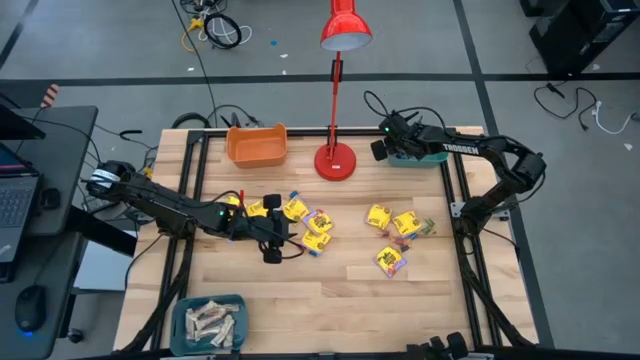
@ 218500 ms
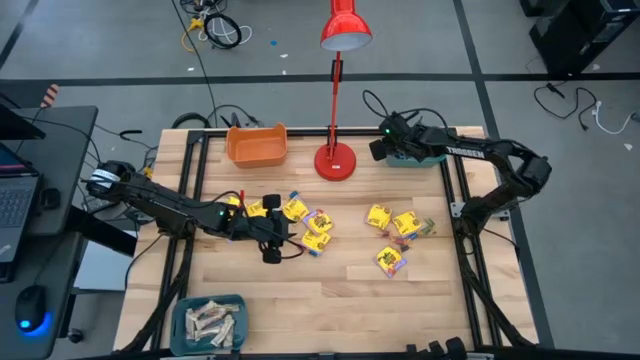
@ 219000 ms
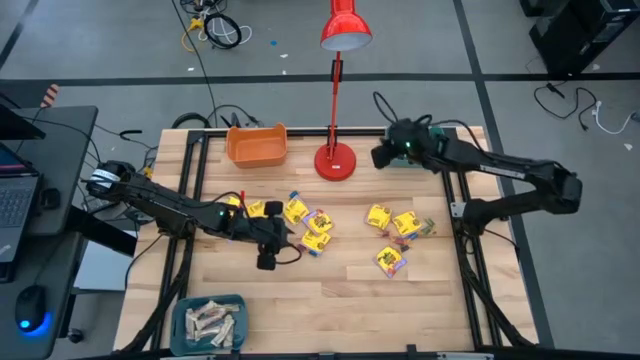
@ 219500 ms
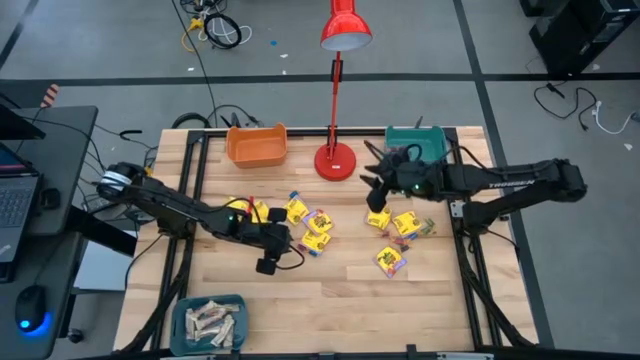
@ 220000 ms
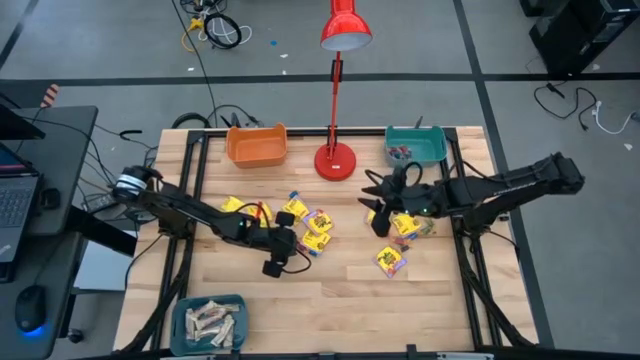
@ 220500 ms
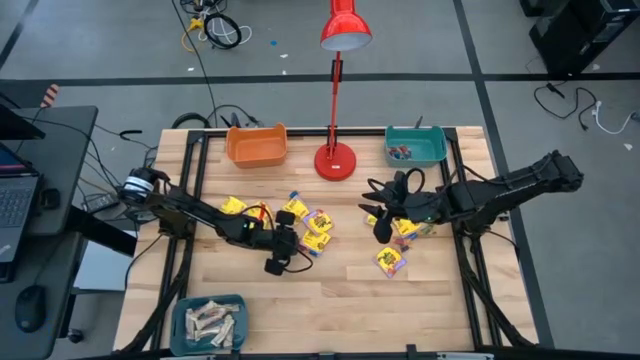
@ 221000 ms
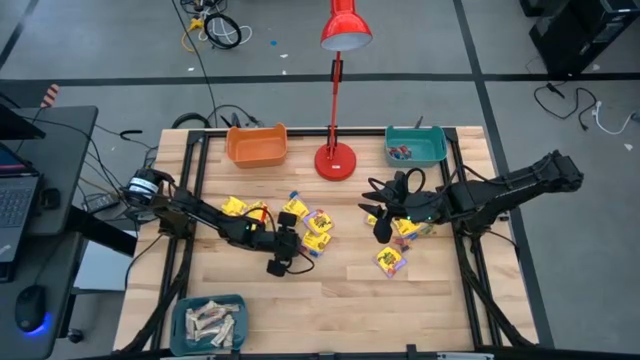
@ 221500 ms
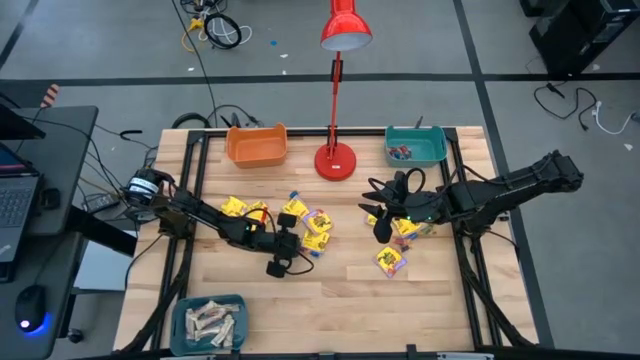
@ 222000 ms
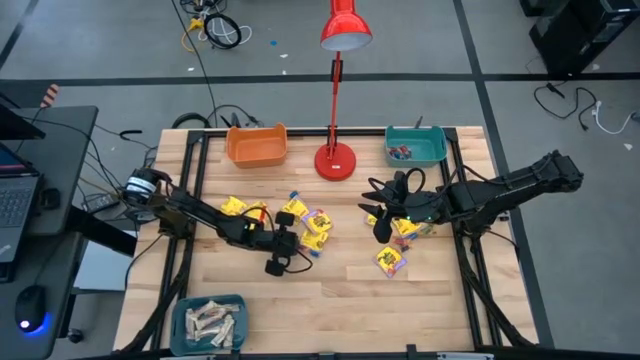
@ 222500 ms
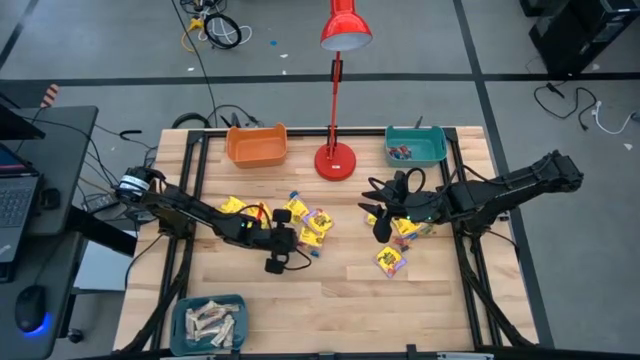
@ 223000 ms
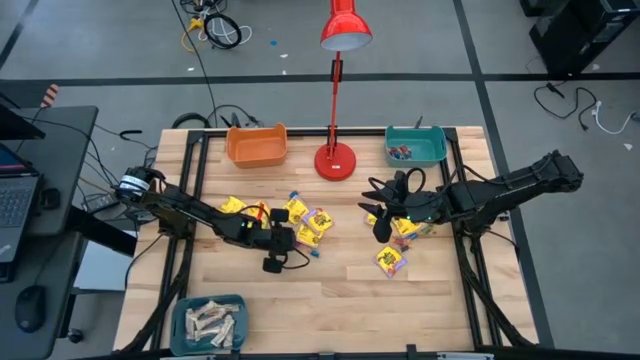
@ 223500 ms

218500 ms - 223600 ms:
Task: Sort candy
Put the small red candy into the green bin

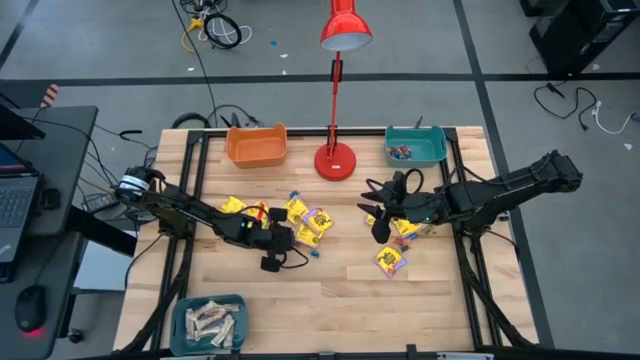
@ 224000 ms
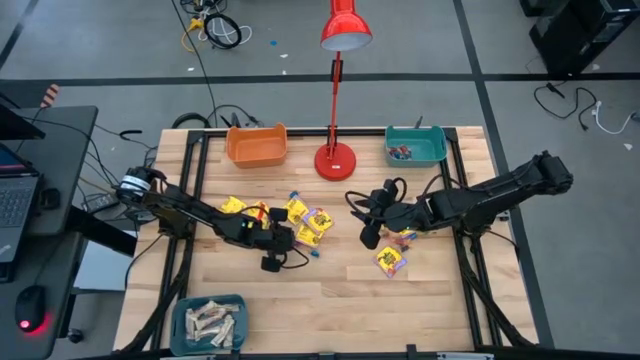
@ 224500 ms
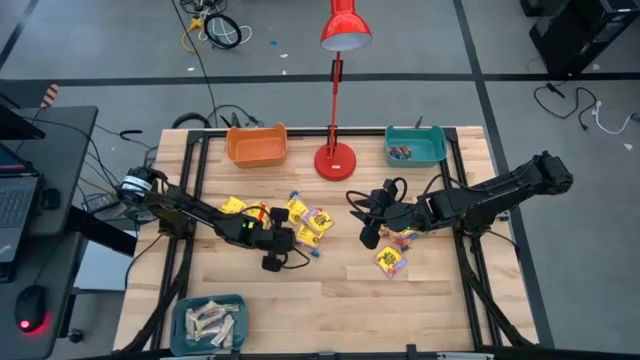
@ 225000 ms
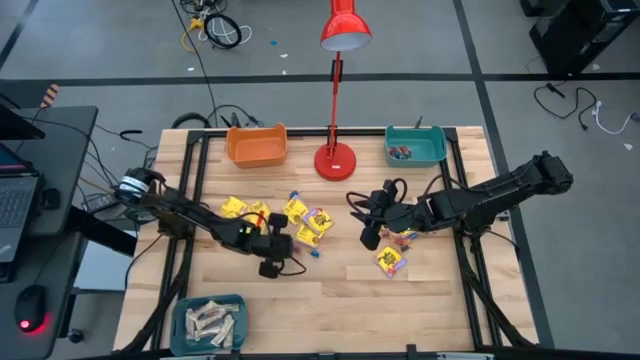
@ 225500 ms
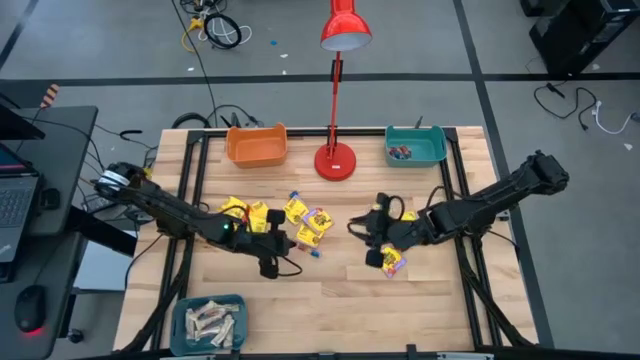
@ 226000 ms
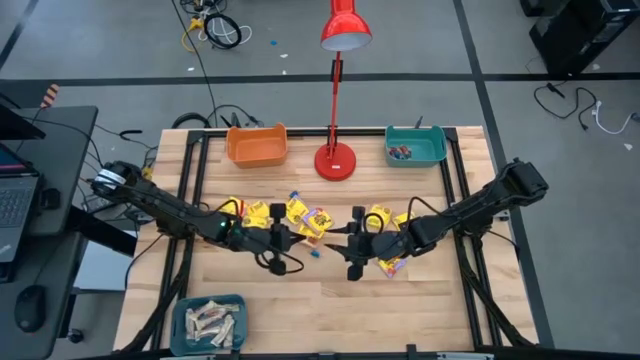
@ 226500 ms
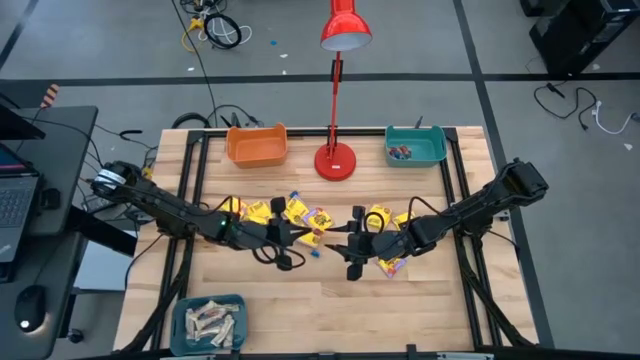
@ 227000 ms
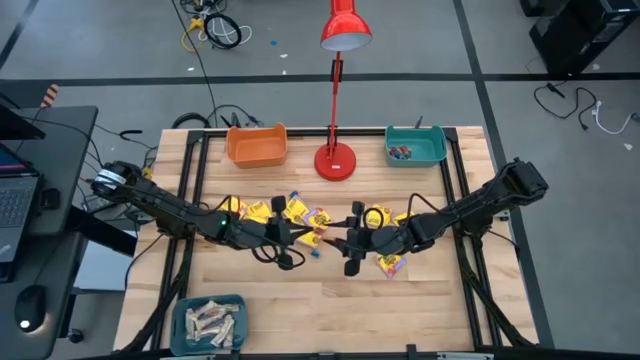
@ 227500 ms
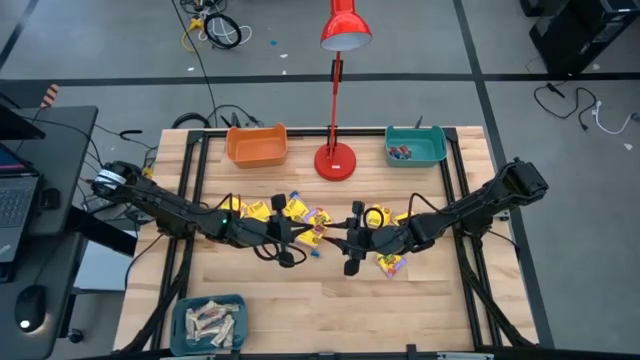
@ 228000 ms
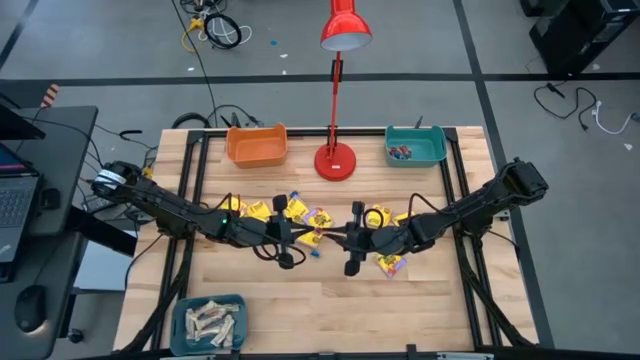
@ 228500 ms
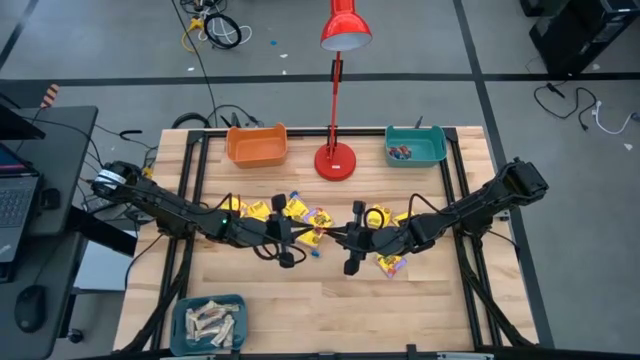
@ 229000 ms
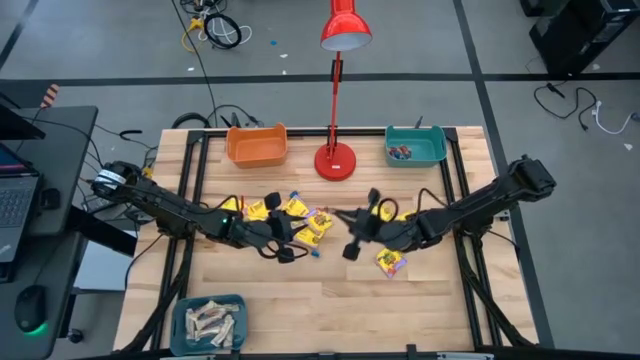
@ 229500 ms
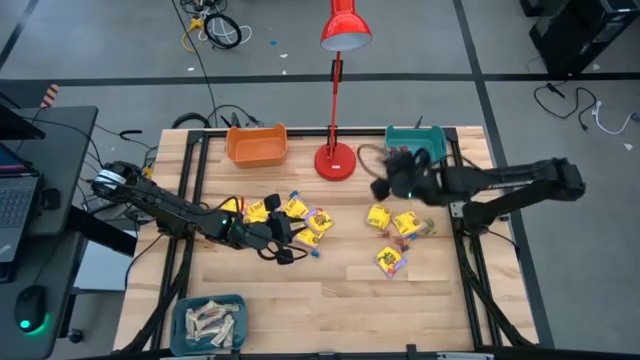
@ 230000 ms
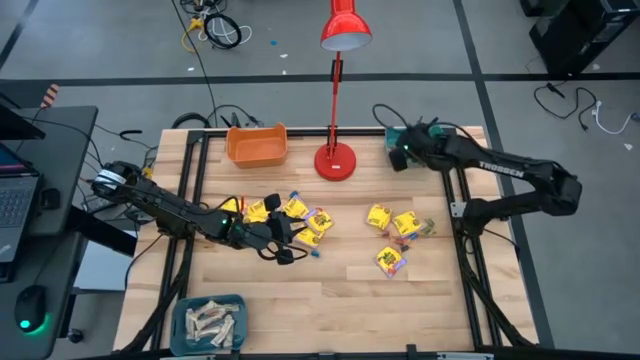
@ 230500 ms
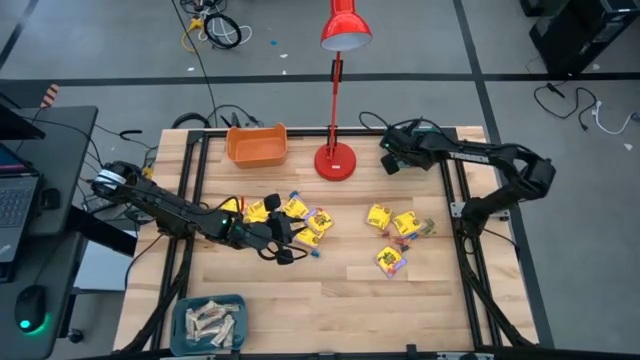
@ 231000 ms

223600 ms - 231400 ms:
Put the small red candy into the green bin

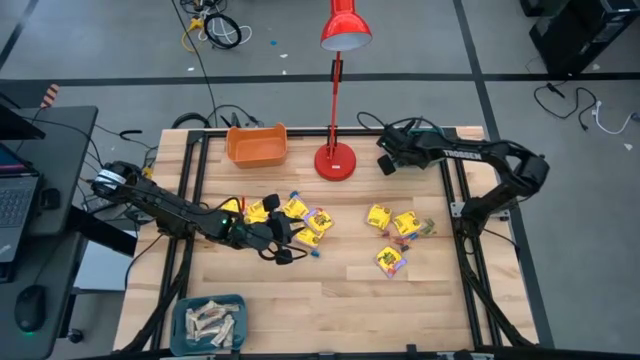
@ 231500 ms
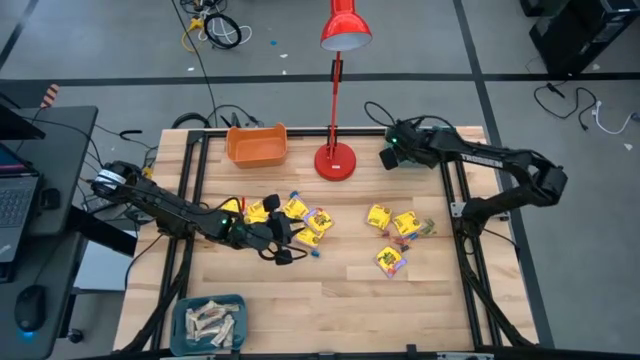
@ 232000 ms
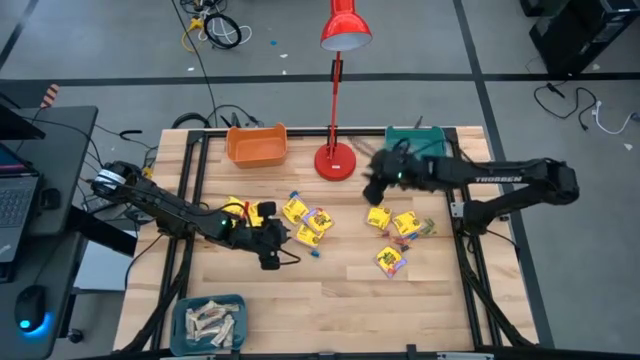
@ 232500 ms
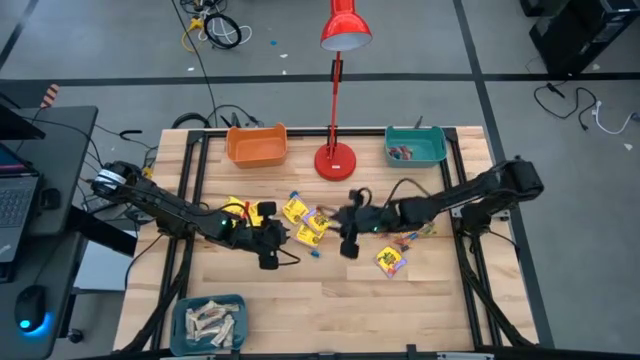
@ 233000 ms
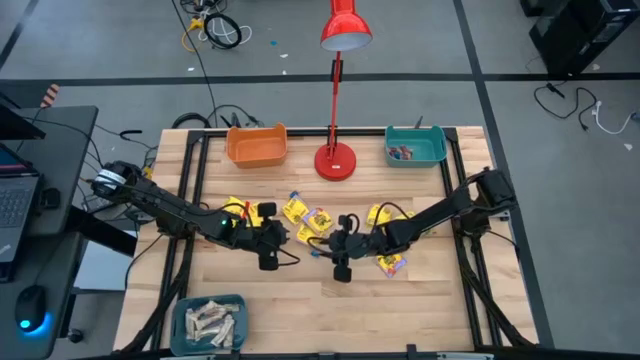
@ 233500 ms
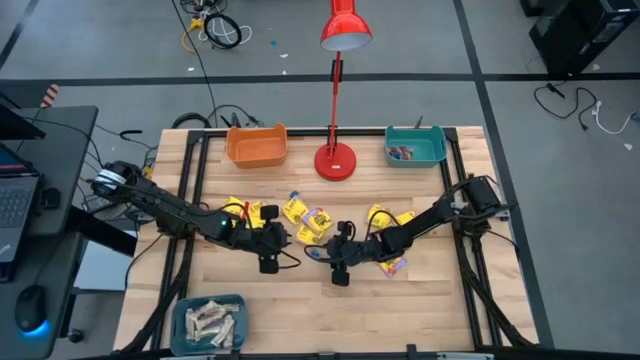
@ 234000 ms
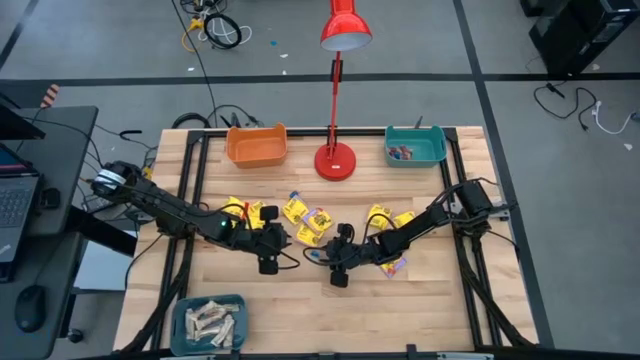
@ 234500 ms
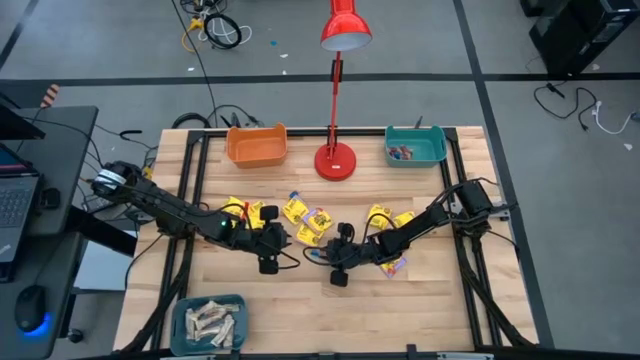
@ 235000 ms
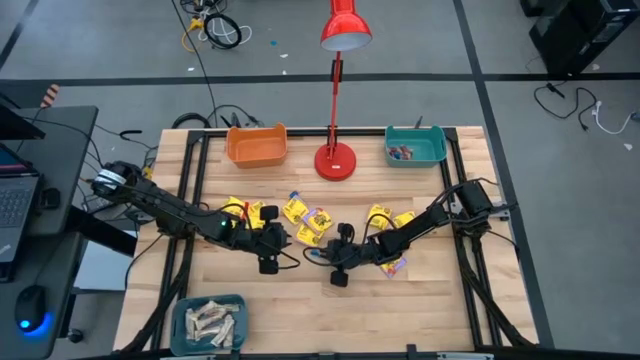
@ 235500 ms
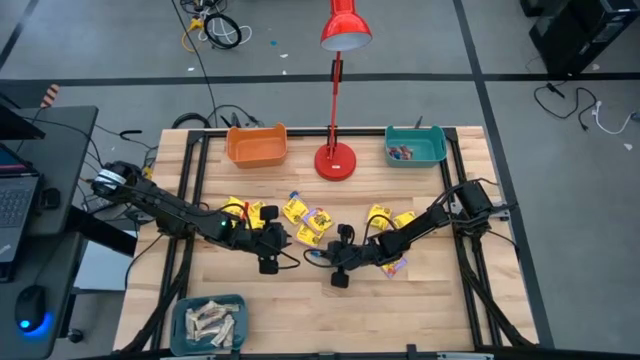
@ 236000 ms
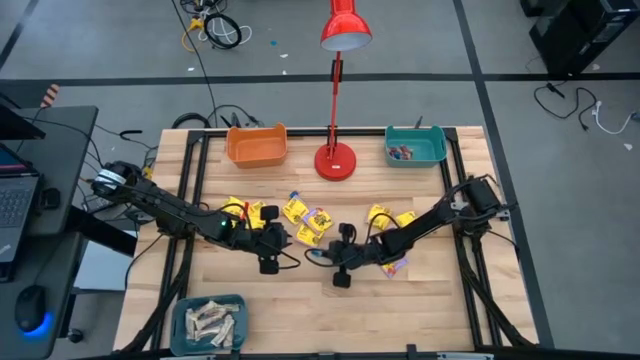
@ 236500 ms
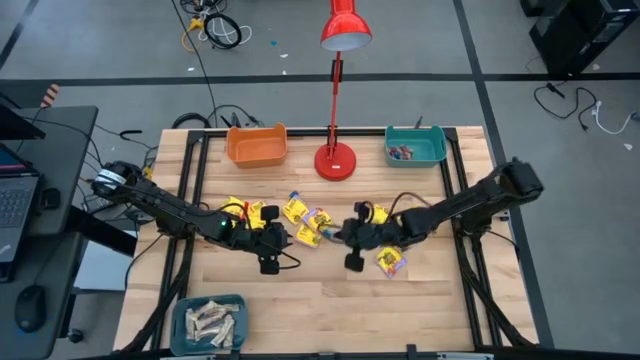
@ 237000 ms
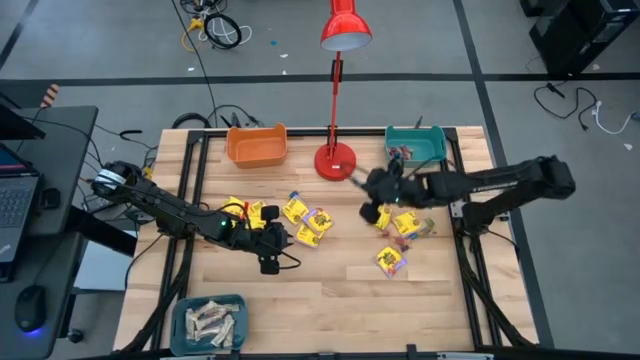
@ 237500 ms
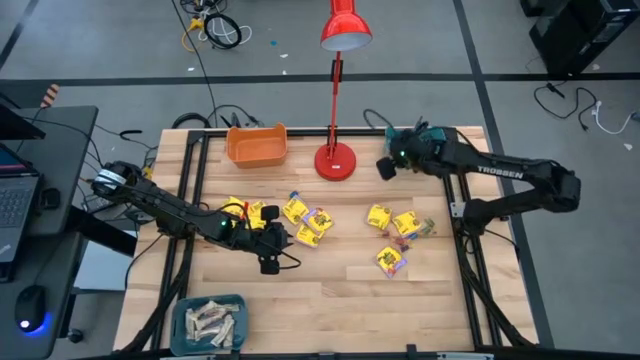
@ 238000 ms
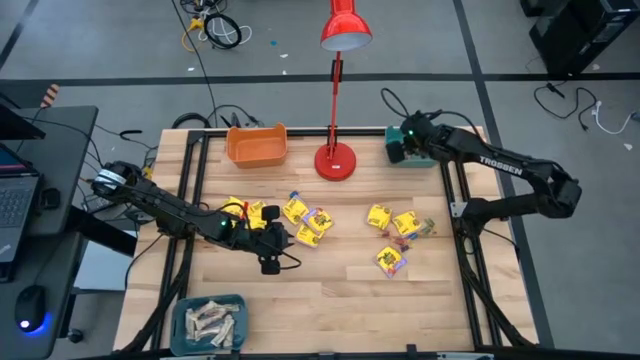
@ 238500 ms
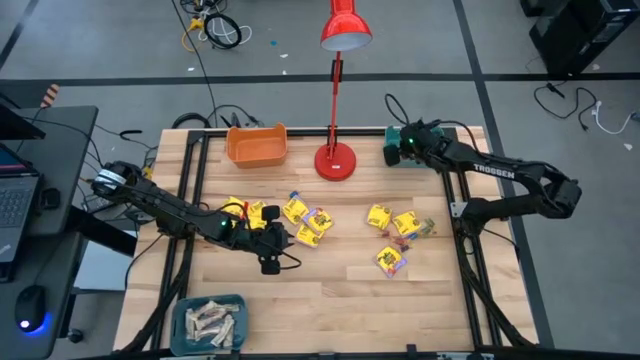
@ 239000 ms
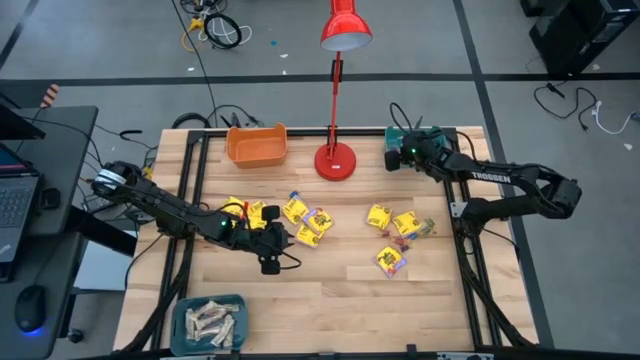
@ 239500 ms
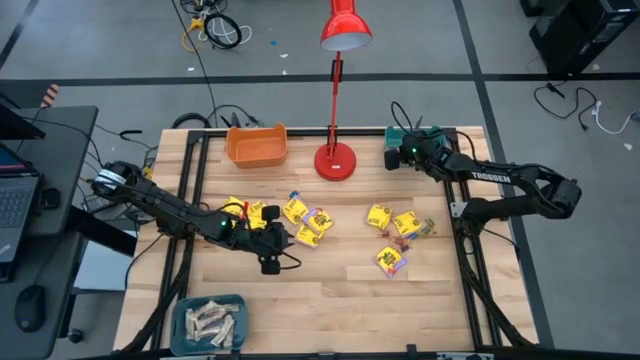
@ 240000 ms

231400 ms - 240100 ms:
Put the small blue candy into the green bin
